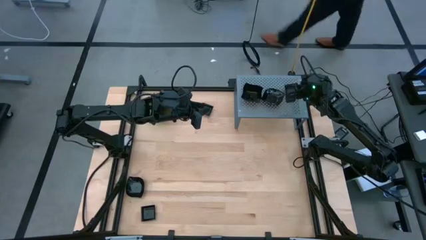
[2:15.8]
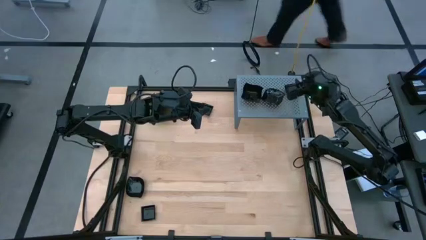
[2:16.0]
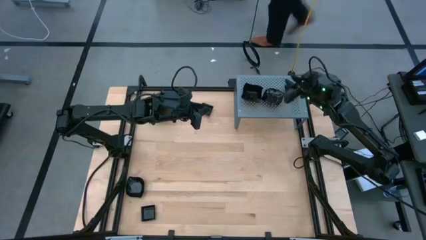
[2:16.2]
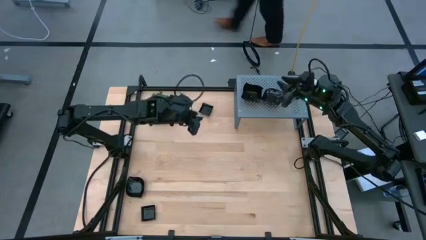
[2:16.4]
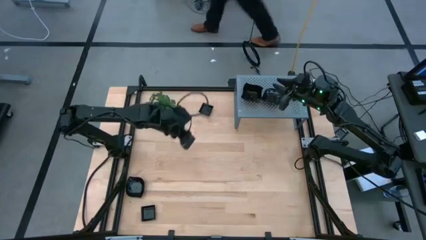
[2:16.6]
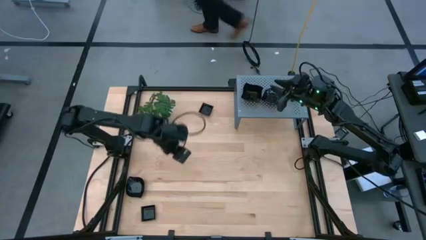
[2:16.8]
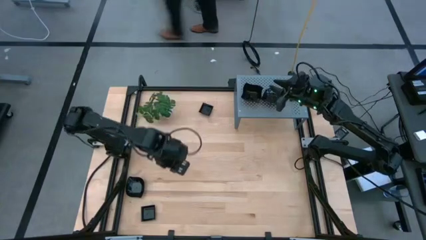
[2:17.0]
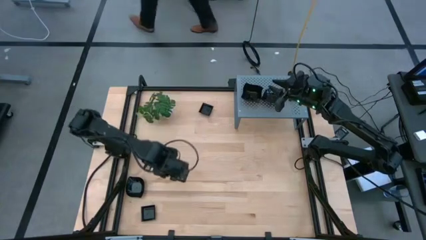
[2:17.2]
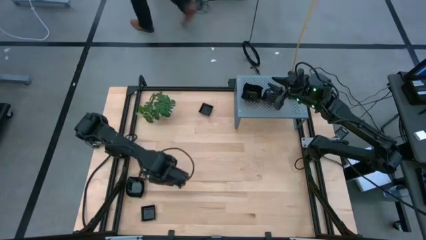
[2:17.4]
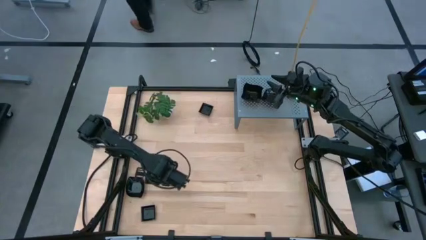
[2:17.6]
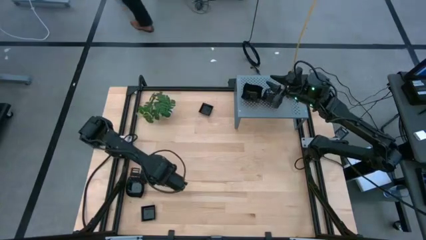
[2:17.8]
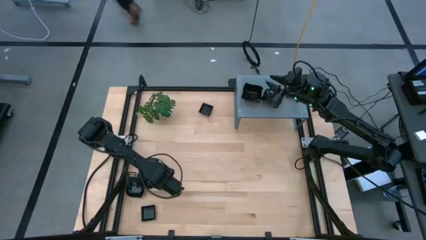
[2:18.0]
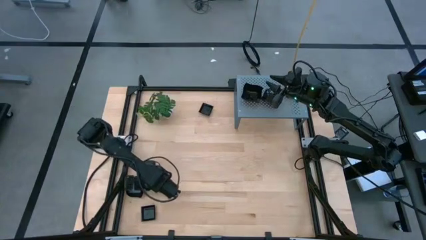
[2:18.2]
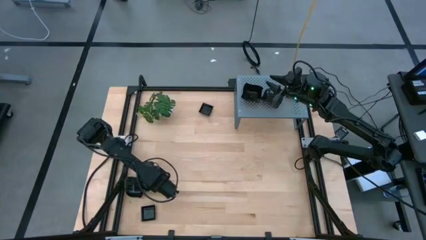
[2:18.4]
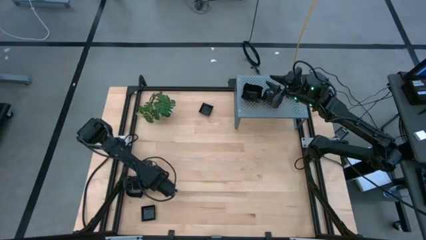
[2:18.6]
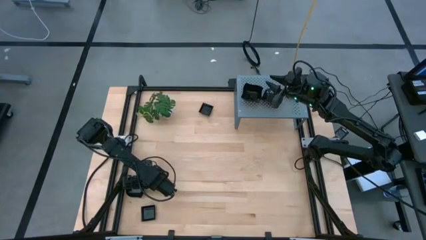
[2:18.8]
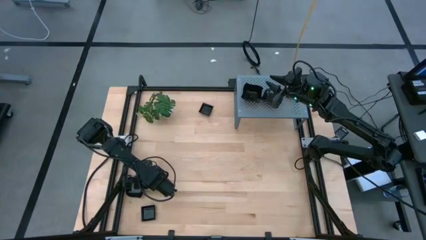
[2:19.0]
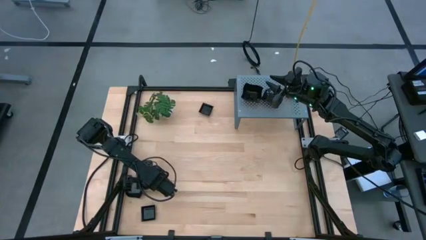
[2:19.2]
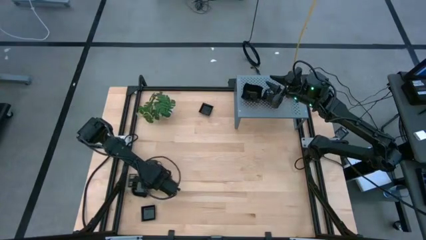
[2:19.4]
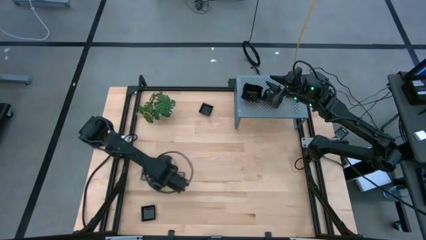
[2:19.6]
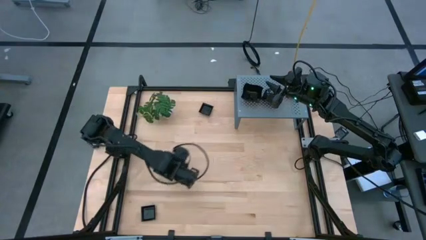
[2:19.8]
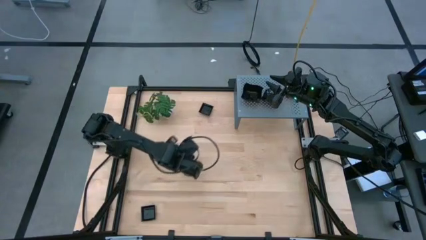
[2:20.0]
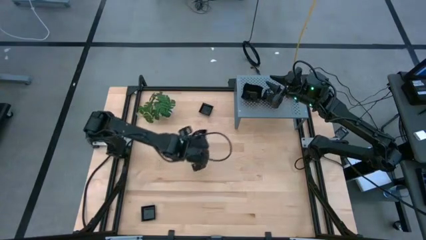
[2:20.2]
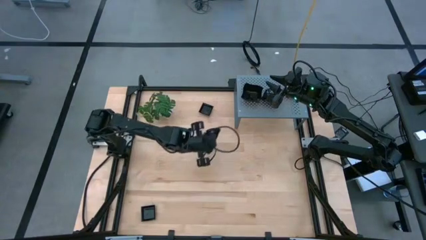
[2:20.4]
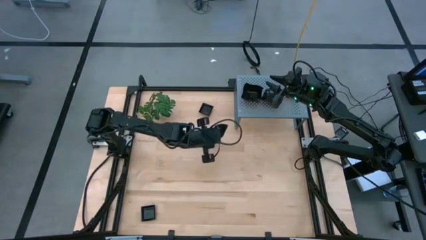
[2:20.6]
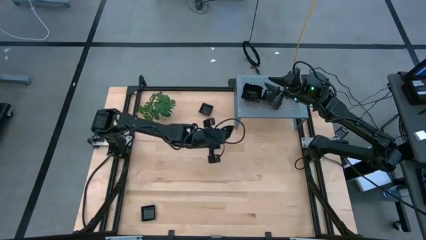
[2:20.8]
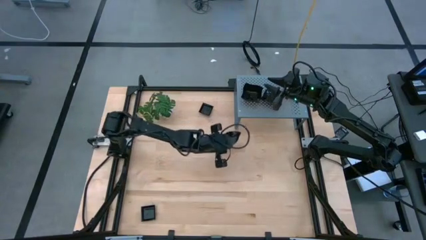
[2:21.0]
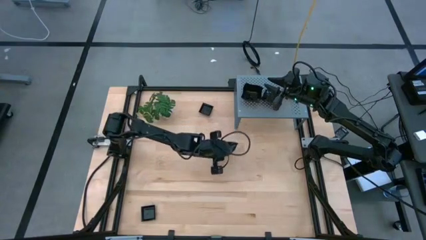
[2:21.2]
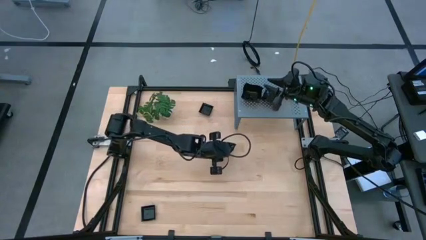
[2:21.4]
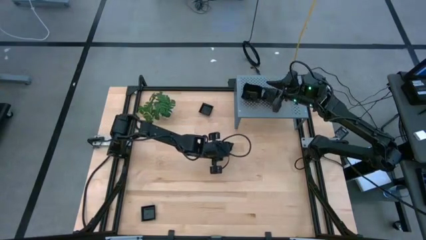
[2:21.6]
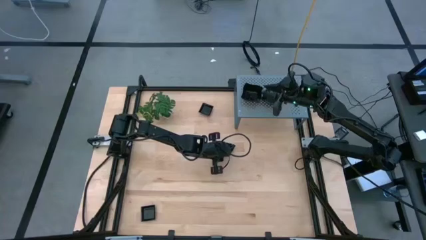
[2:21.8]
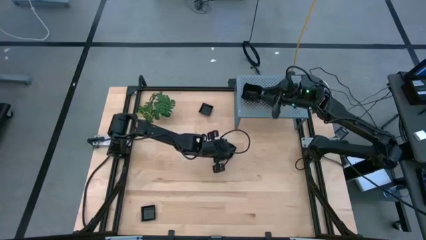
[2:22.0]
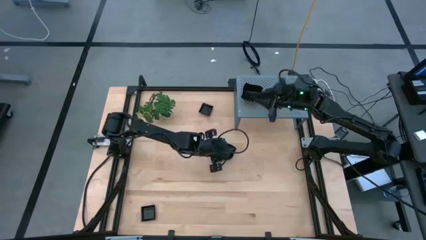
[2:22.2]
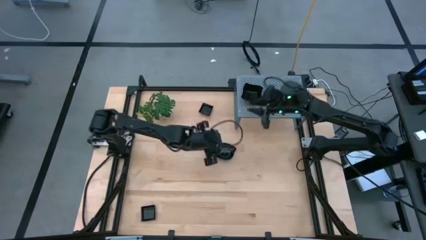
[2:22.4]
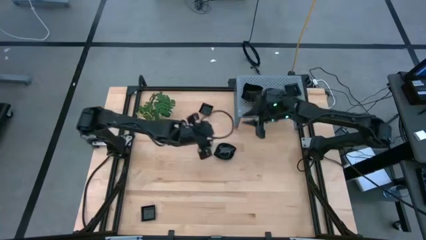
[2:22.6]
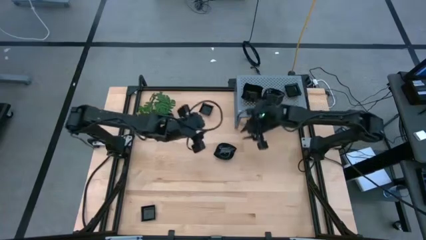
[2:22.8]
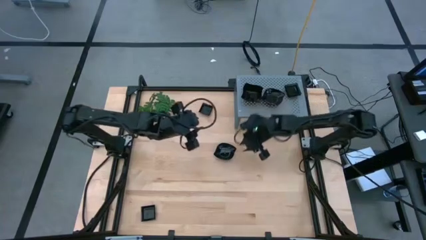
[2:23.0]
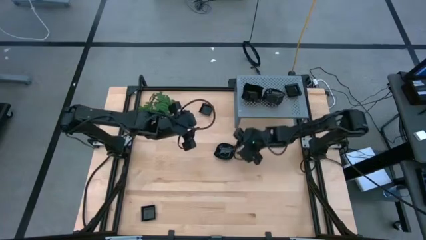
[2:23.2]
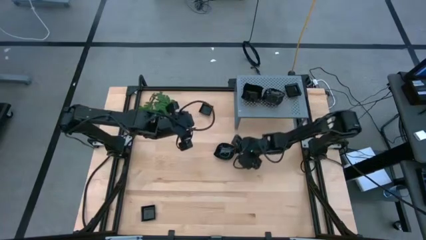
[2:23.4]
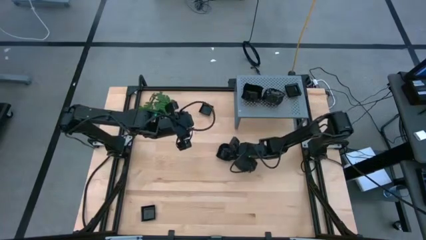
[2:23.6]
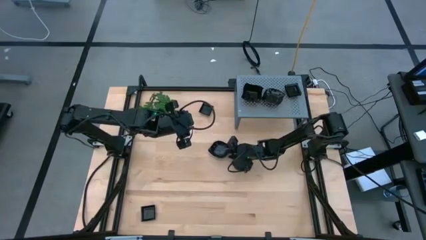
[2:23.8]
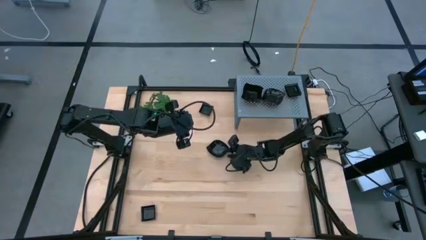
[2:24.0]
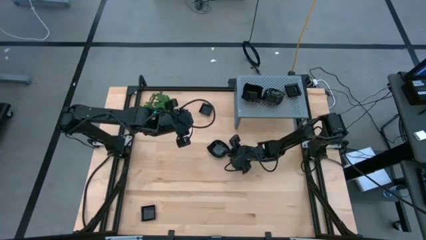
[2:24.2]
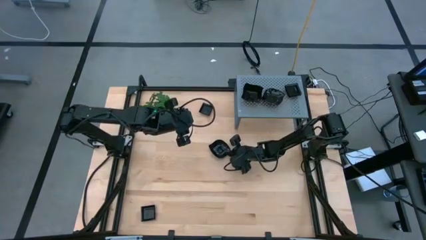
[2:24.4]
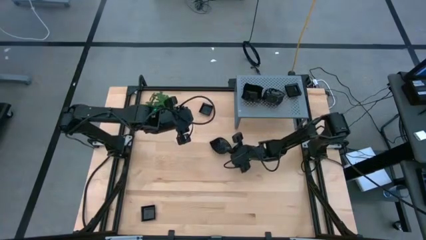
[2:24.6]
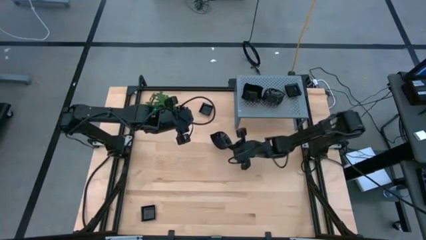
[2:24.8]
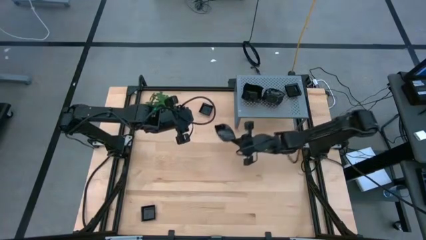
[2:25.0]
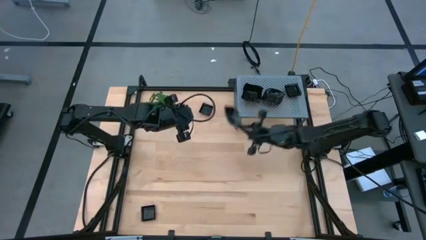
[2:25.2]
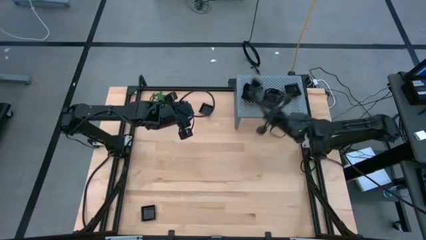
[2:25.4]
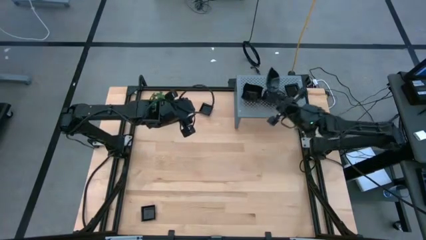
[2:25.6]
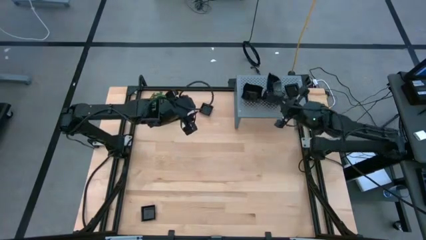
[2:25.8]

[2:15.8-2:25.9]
Task: Pick & Place Mini shaped plates
Stack the leaf shaped plate on top of the leaf shaped plates on the shelf
